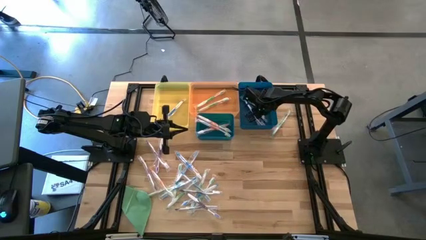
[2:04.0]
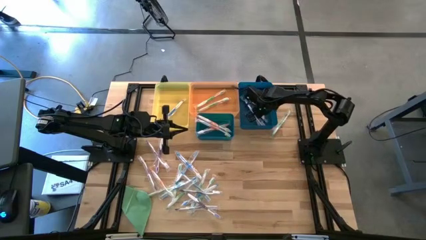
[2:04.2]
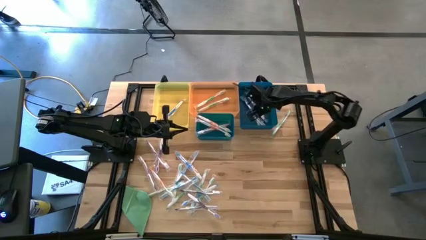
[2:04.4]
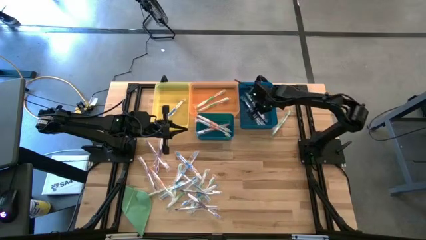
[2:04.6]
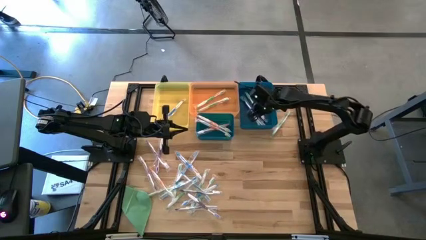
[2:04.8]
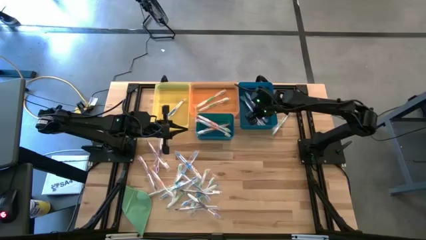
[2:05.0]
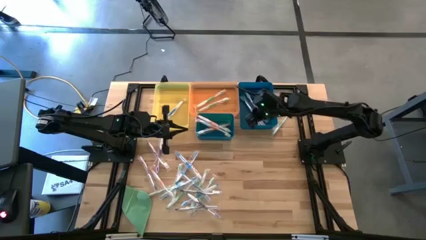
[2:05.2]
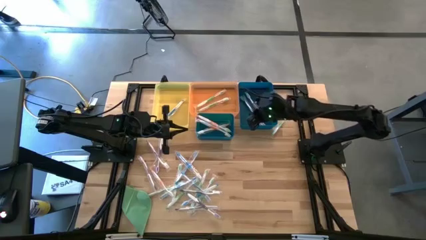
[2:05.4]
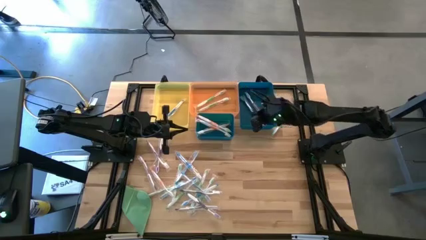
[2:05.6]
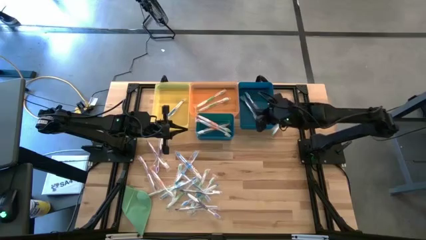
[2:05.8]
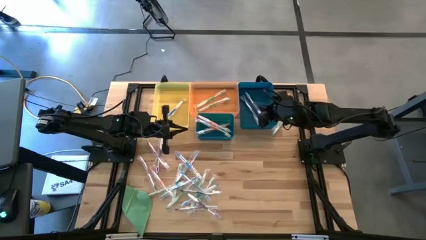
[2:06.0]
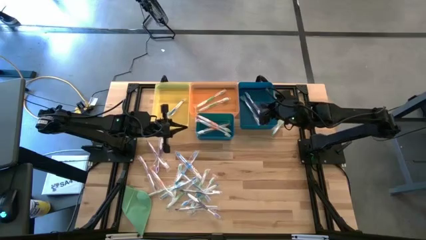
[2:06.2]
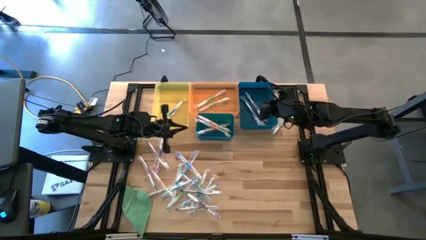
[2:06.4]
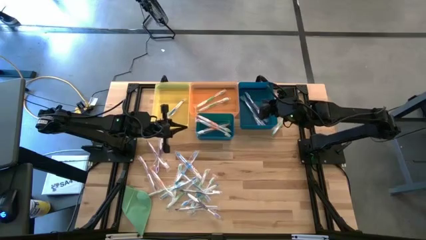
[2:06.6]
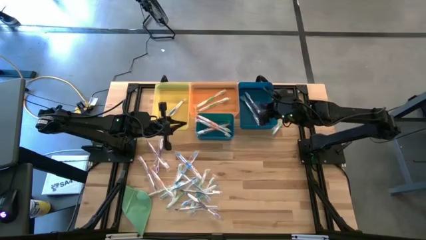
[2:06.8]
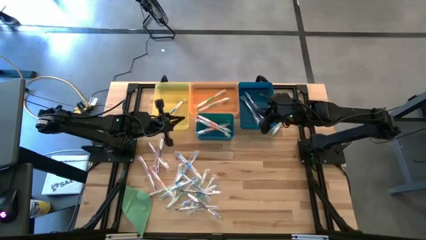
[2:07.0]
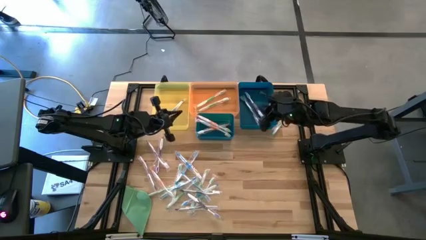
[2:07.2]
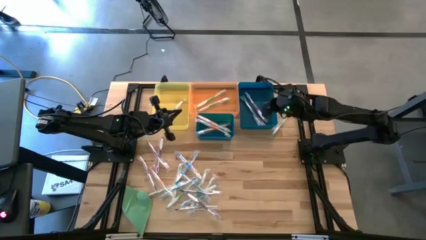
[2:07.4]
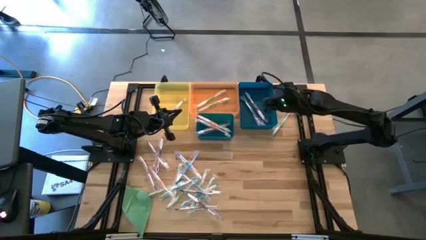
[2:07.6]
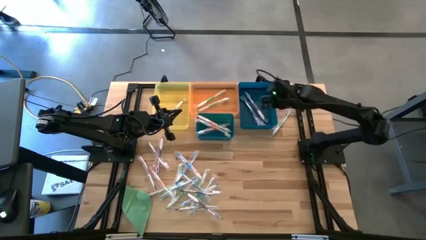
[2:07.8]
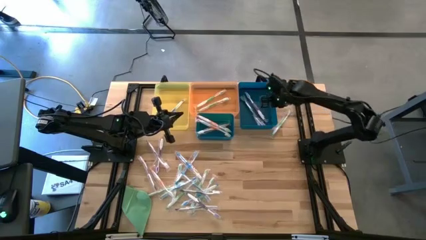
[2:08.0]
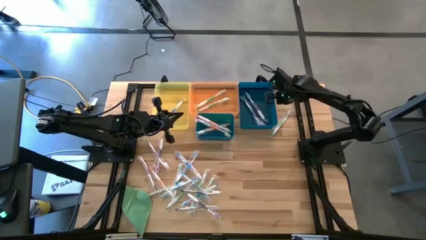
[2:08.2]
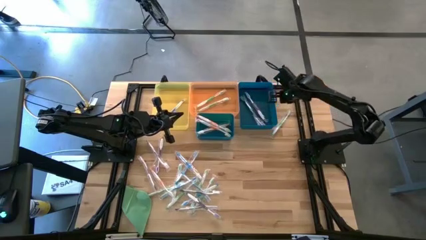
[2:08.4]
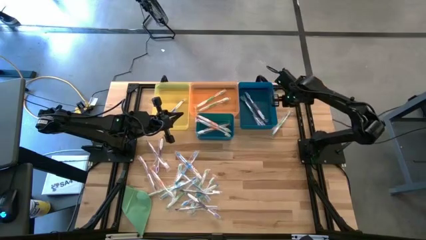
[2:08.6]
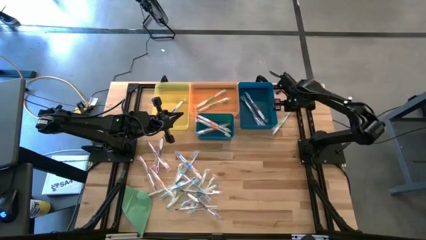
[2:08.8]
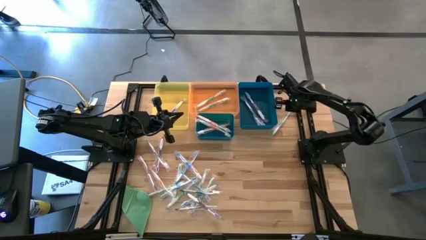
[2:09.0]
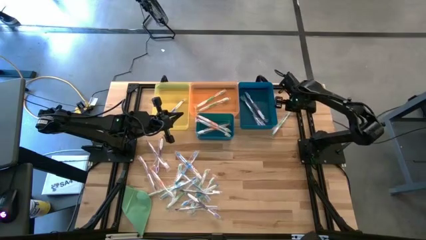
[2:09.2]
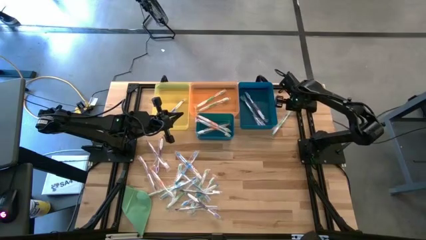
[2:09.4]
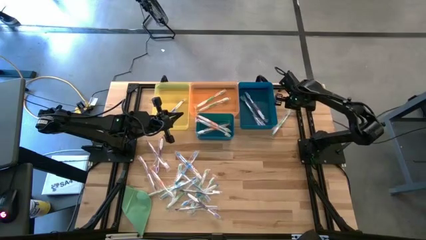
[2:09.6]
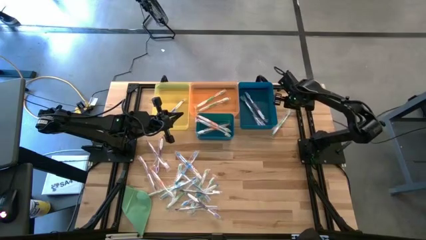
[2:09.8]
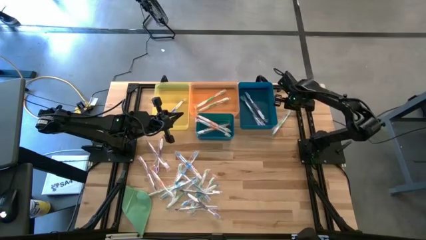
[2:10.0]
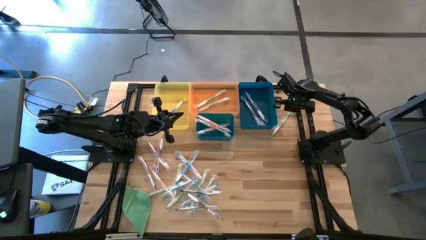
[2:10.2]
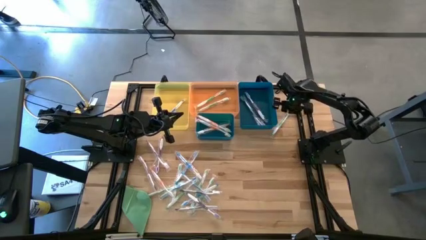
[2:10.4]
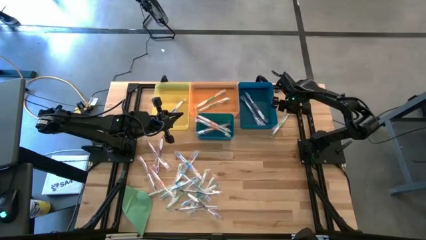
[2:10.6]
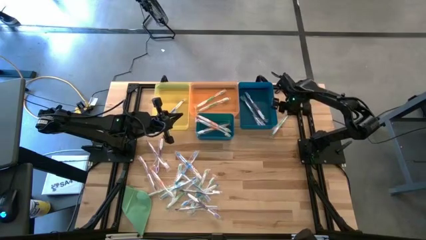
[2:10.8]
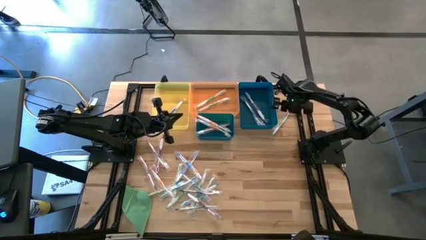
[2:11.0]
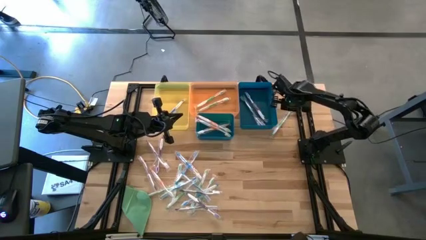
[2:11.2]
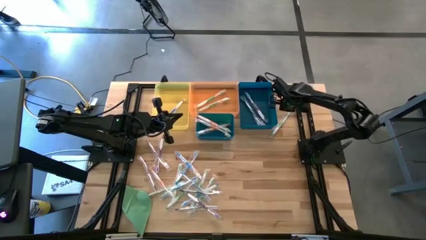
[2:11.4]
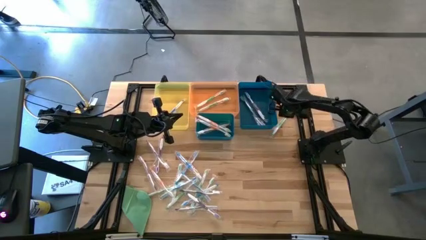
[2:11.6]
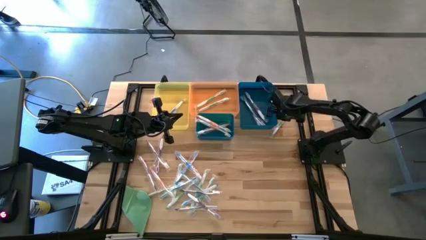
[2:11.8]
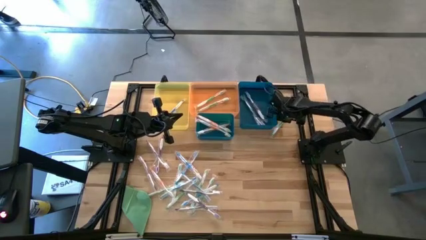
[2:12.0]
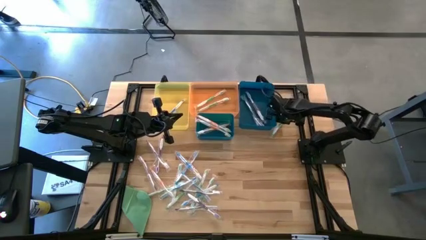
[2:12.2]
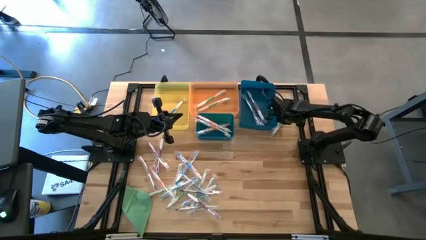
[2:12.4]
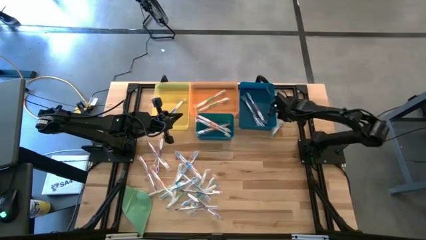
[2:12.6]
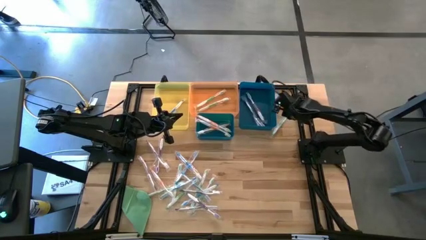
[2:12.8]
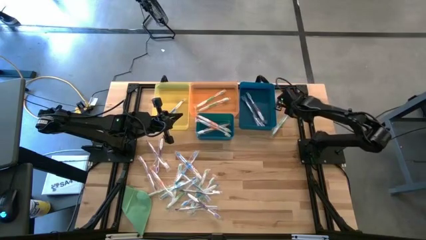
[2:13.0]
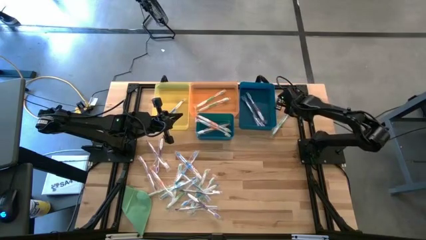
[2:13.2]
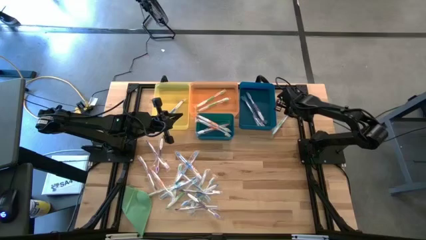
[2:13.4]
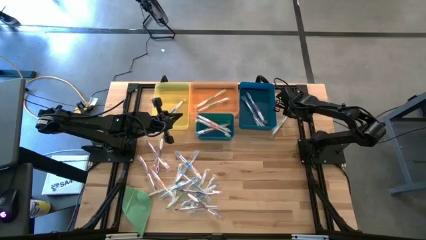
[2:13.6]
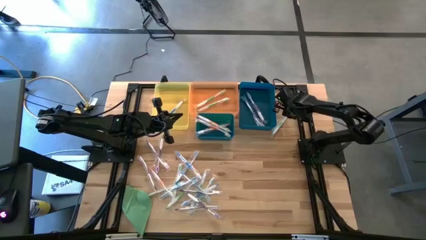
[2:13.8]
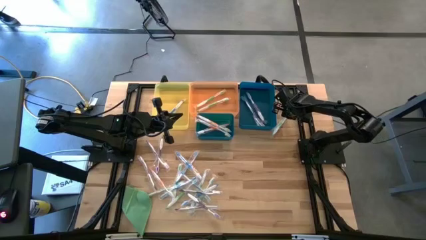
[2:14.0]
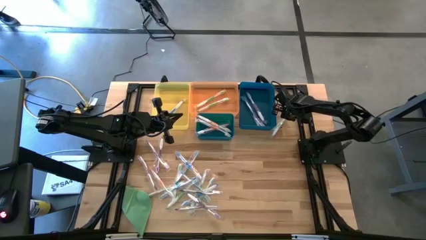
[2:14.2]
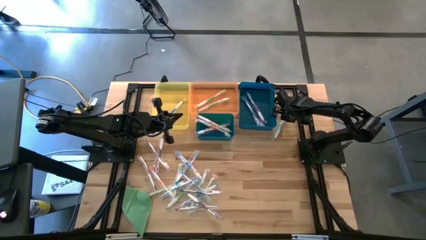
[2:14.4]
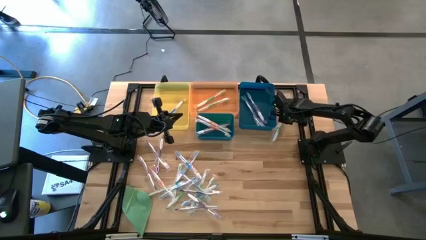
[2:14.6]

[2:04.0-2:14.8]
Task: Pick & Place Toothbrushes
Put the green toothbrush into the orange bin
